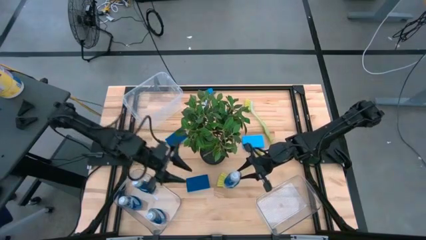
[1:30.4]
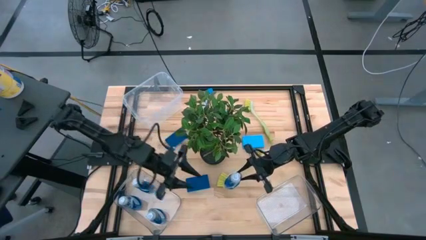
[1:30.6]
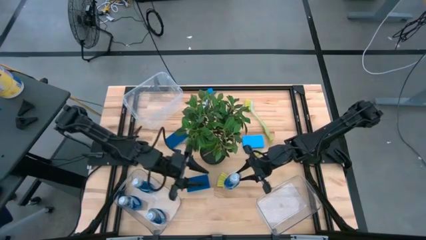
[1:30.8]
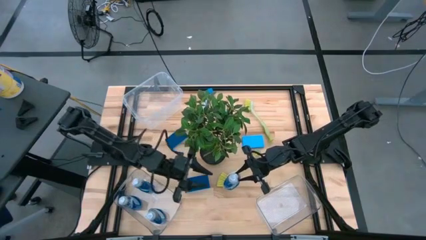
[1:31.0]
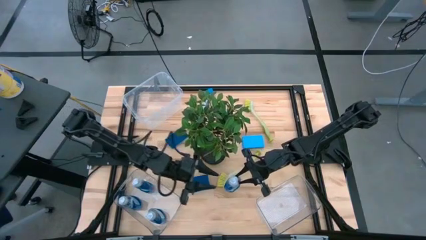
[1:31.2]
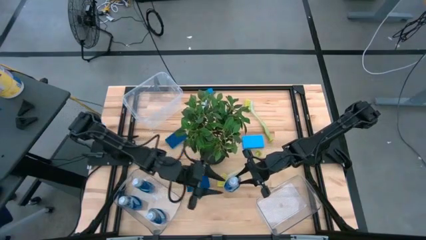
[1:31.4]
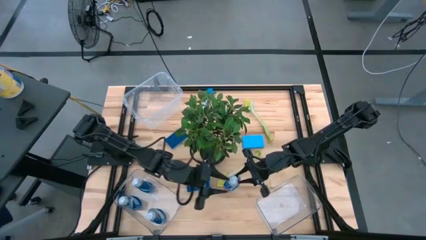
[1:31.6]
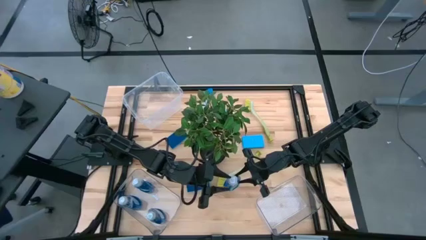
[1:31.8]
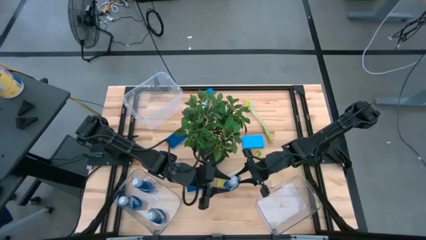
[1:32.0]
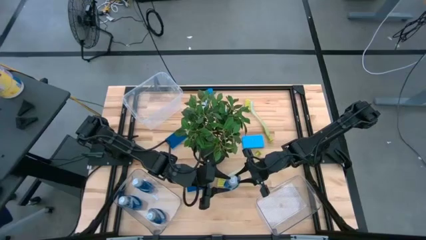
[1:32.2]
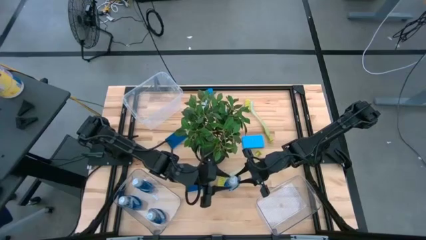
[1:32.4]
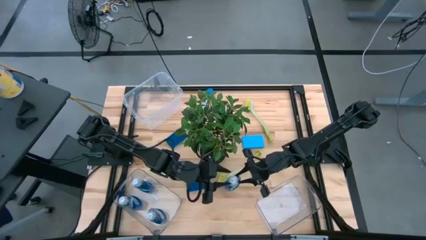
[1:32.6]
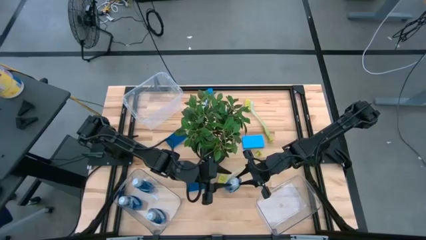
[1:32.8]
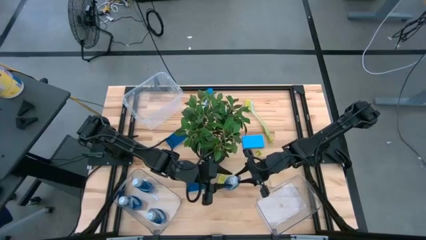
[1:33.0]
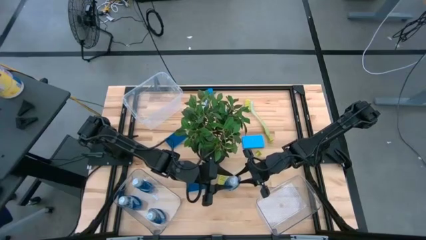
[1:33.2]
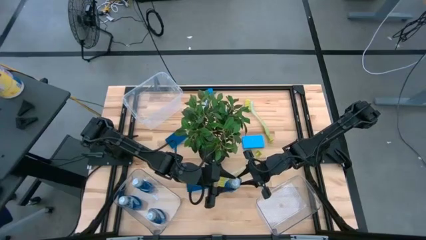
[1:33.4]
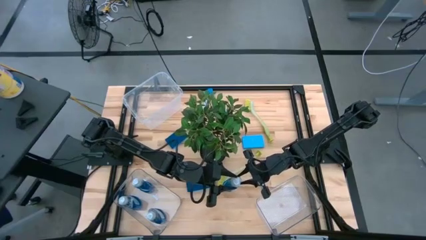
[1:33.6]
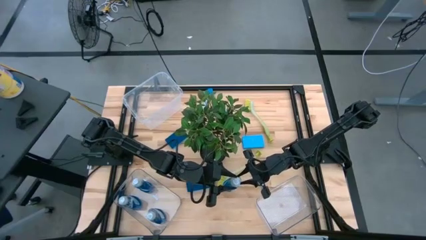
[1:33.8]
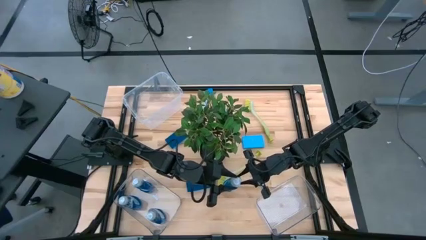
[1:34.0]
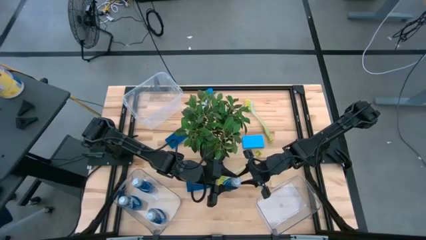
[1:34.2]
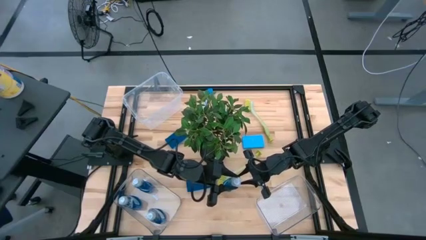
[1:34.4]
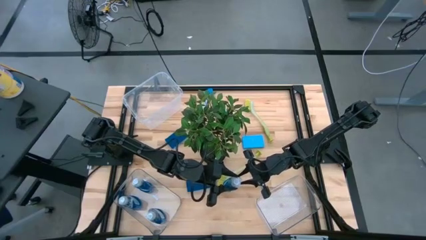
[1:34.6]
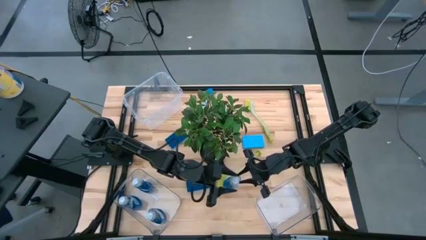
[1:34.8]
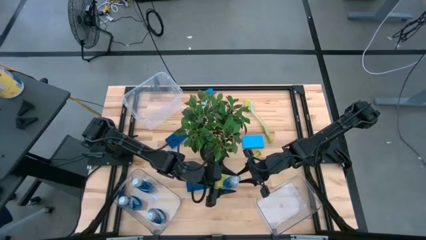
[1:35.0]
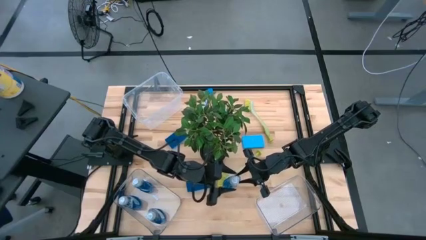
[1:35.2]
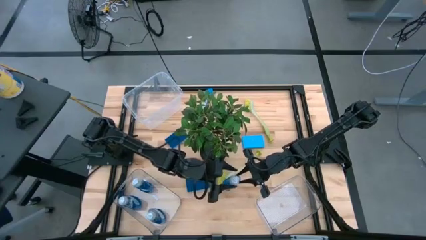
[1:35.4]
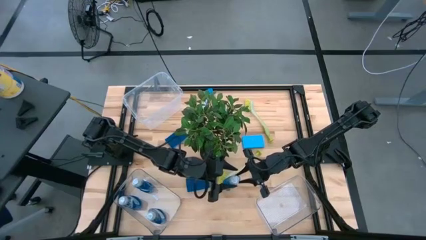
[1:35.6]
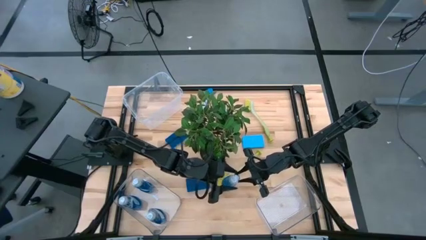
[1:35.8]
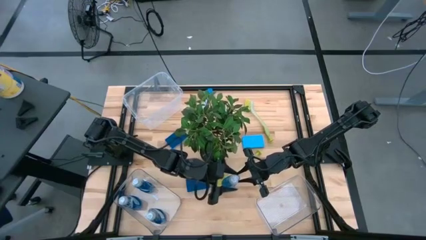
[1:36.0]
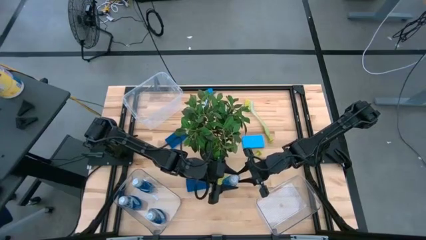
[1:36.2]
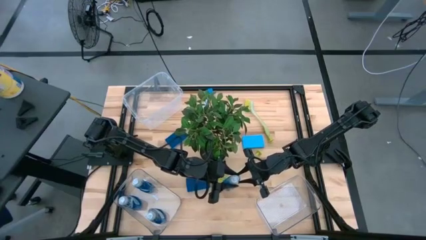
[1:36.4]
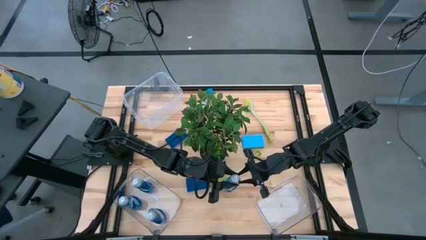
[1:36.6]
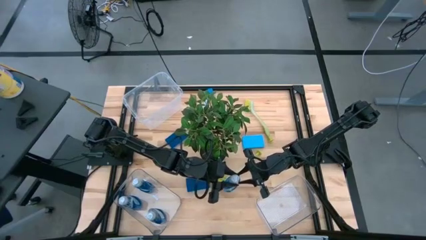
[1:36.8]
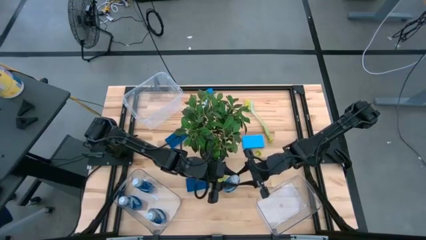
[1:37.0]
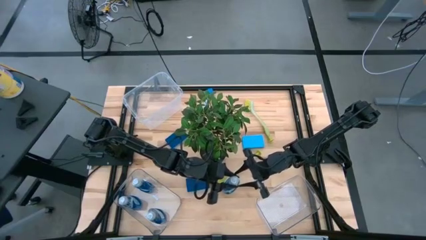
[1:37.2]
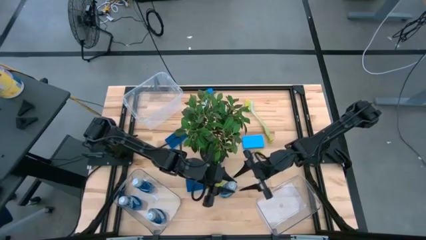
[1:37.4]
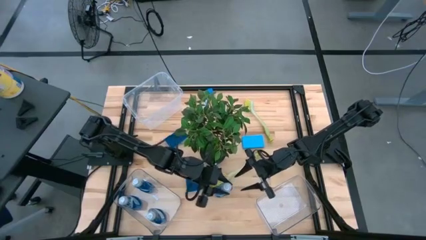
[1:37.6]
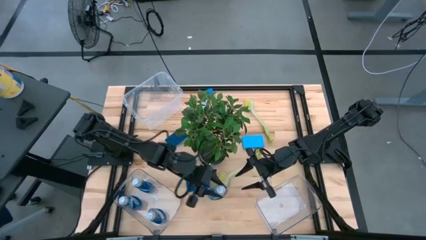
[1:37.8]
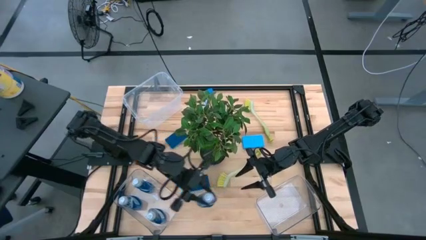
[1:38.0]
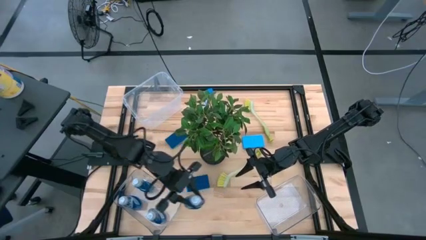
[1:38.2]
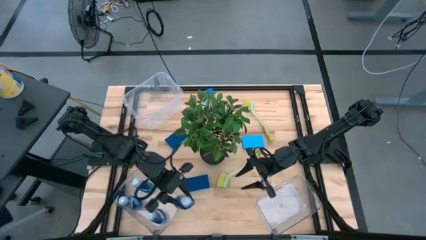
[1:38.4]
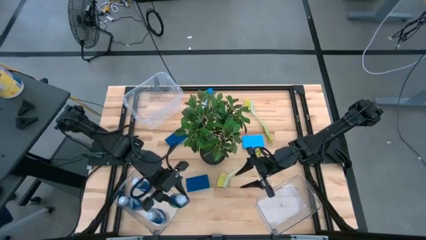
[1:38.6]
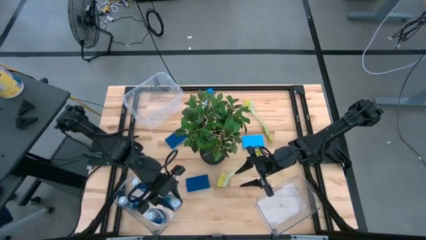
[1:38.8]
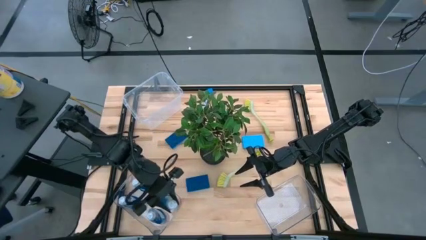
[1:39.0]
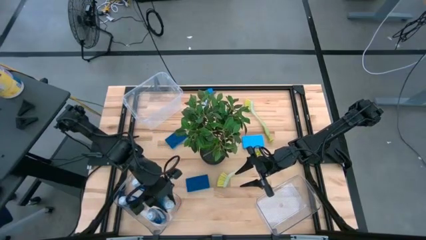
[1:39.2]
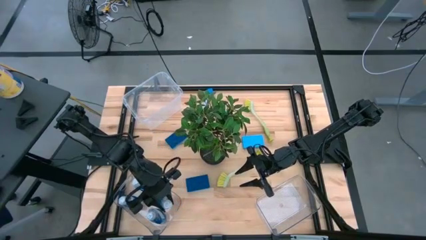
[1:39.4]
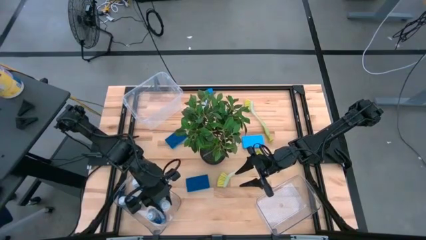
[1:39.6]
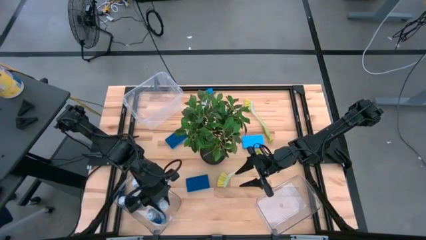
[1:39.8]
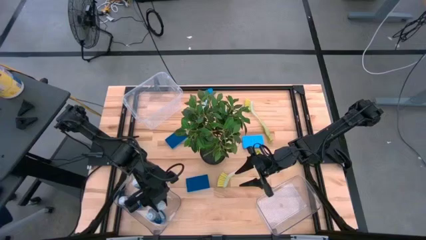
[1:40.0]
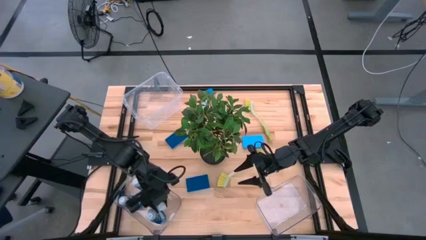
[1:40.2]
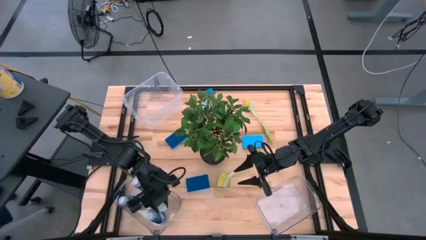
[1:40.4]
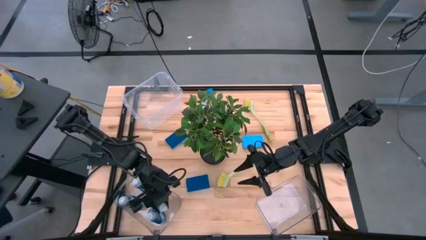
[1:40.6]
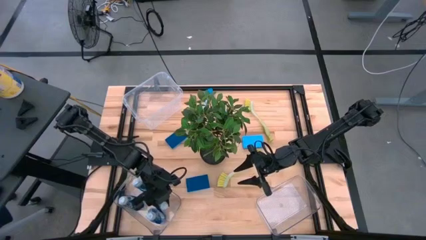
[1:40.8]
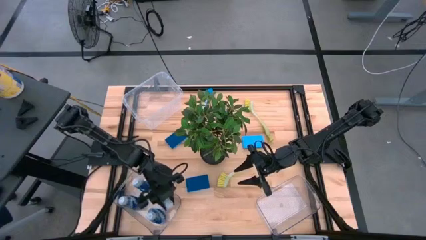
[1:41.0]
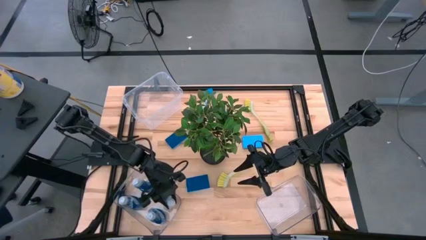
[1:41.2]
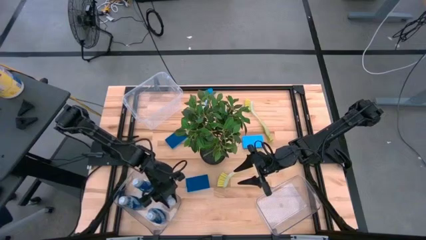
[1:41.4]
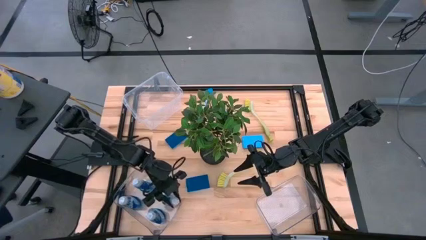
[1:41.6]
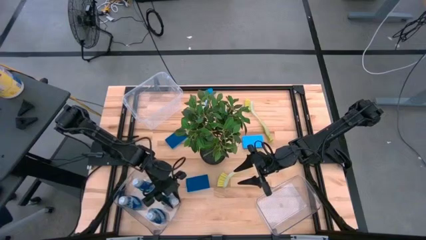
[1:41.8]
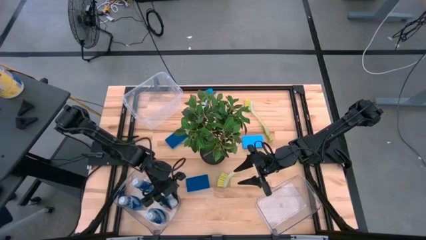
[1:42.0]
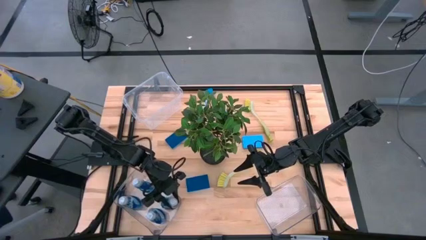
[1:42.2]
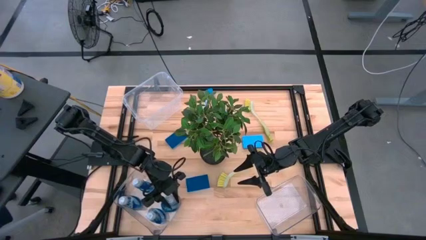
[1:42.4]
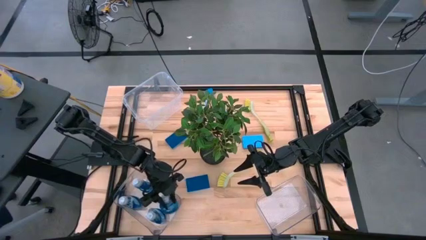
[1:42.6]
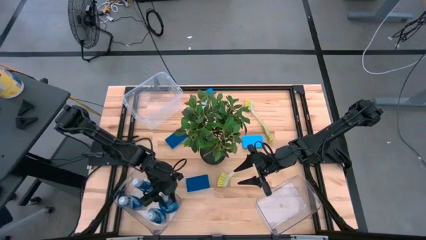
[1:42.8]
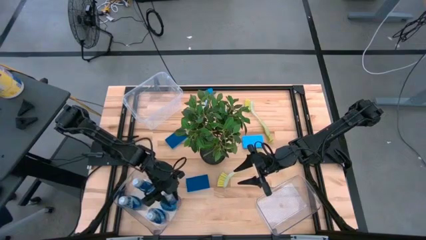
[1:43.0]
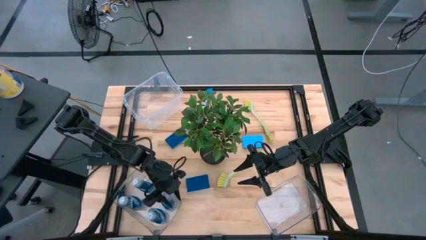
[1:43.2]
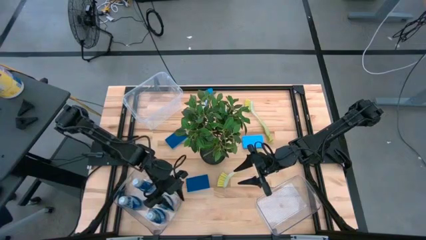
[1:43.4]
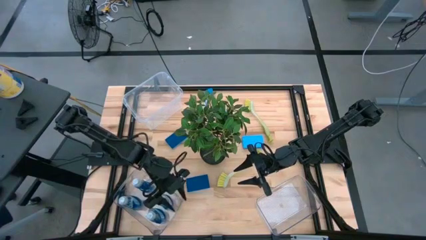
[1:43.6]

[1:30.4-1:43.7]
Task: Pick & Place Kitchen Sink Supplies
Put the blue liquid soap bottle into the bottom left transparent bin

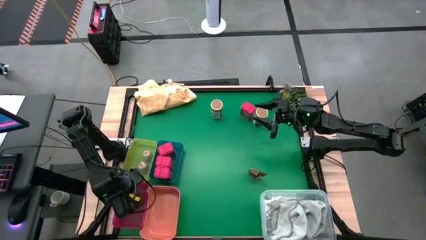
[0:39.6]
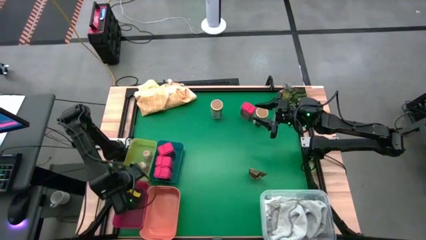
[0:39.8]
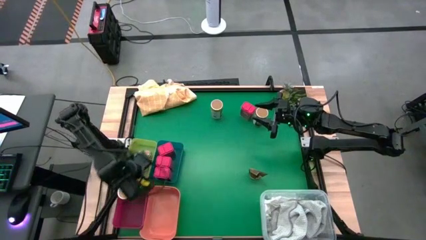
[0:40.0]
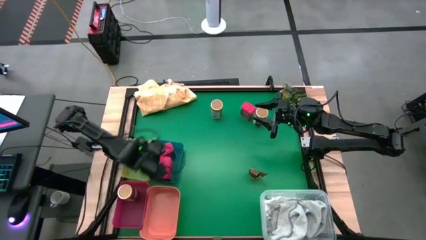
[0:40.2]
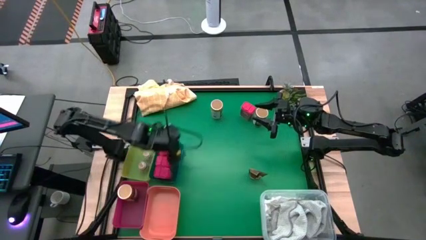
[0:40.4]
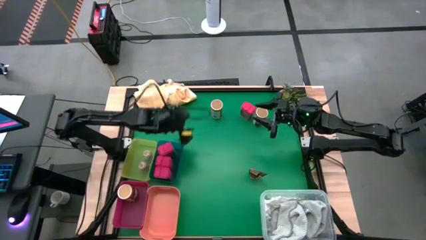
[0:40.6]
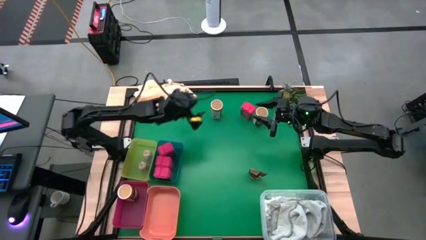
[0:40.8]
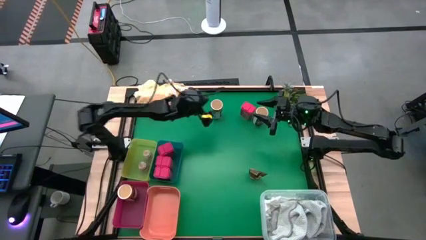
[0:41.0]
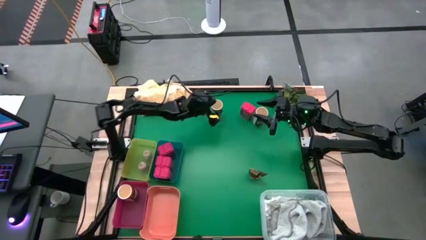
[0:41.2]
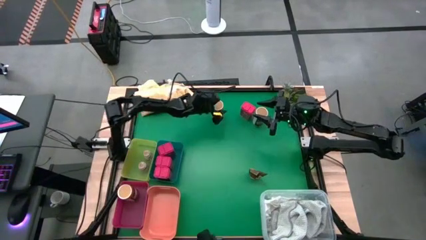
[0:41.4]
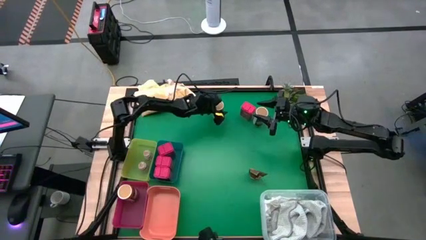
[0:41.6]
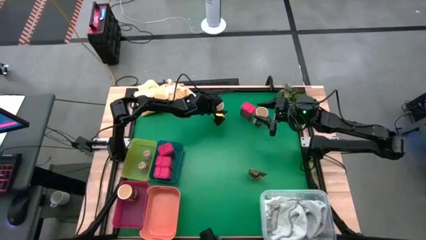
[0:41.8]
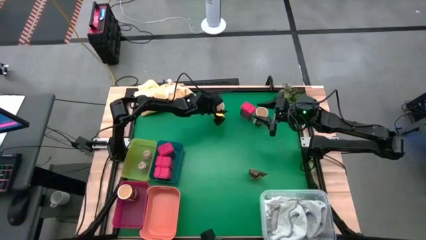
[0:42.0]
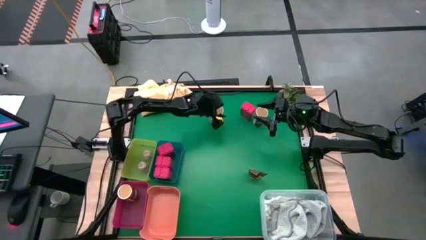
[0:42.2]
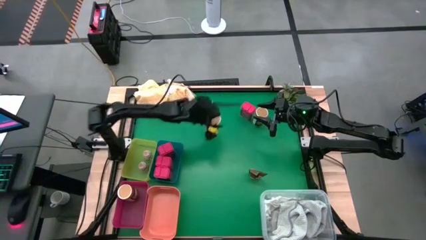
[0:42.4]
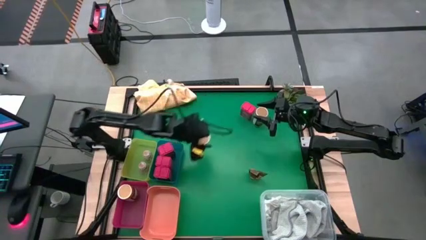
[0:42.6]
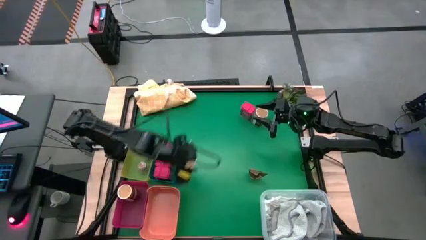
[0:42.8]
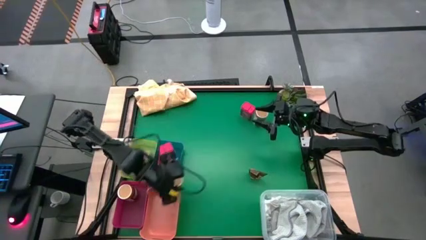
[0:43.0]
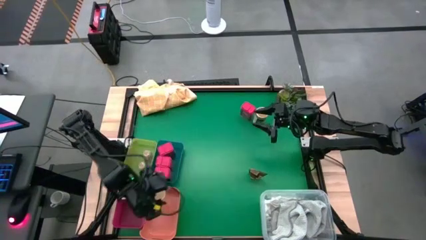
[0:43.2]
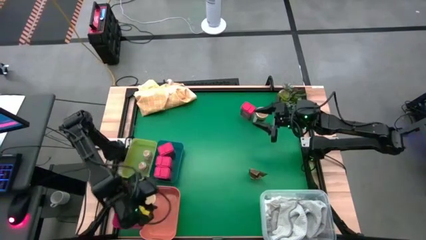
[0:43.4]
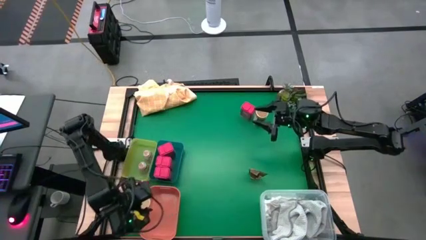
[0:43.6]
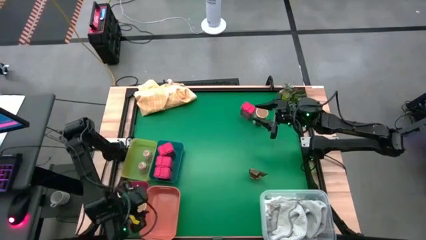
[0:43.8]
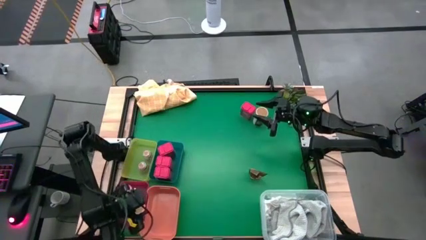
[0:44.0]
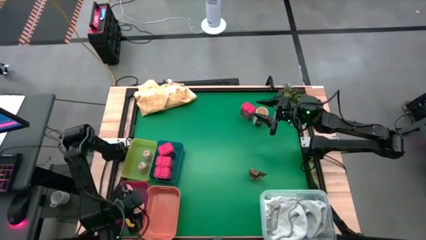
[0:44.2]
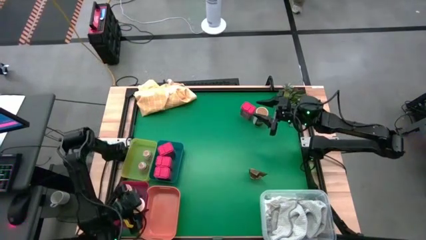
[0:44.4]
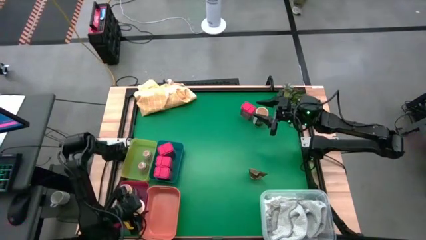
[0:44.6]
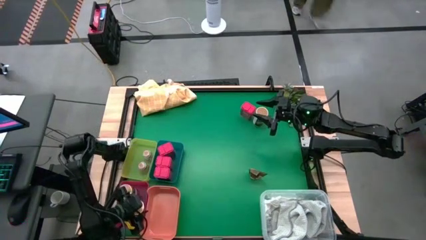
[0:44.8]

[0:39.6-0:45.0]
Task: Sort spices by type
Put the gold seasoning bottle into the red bin
